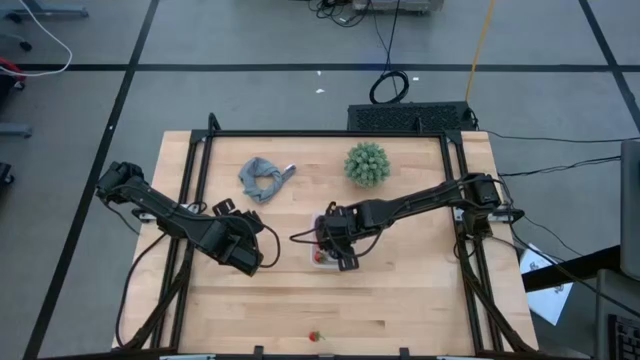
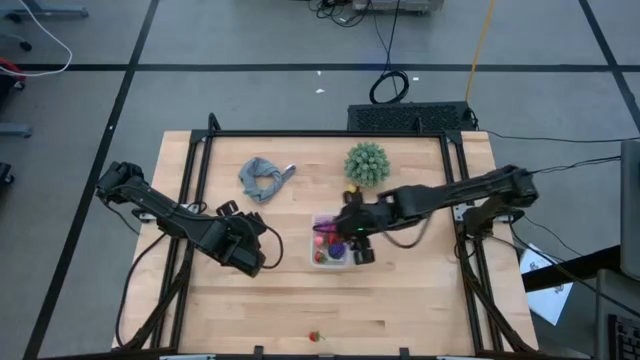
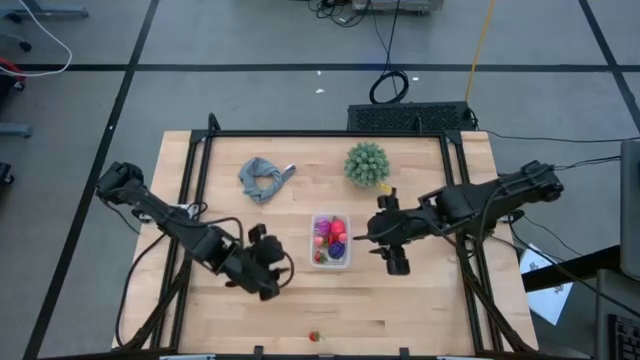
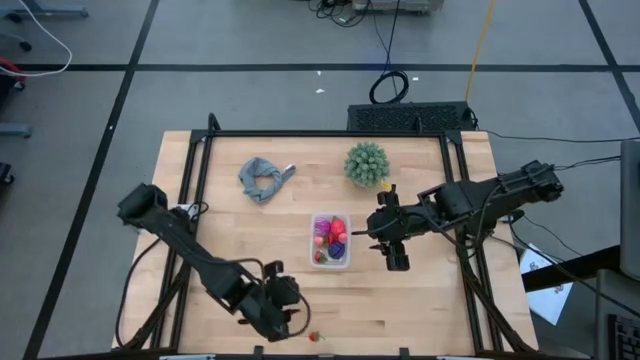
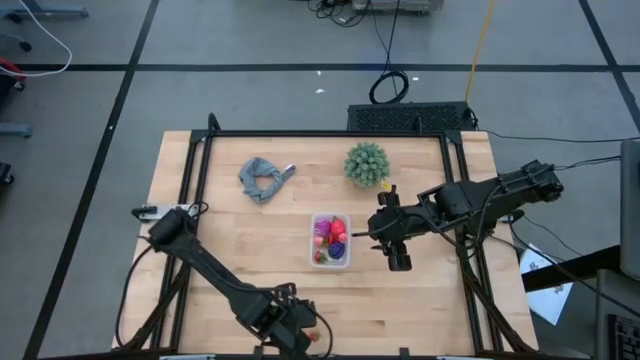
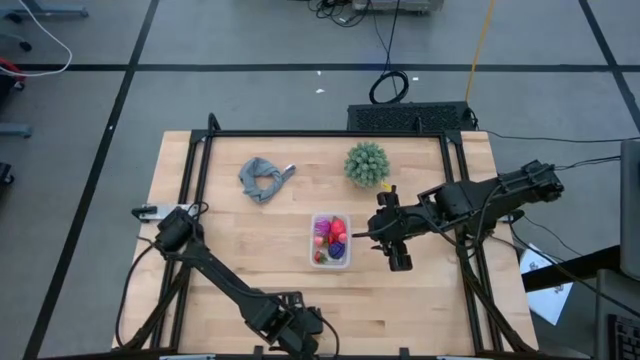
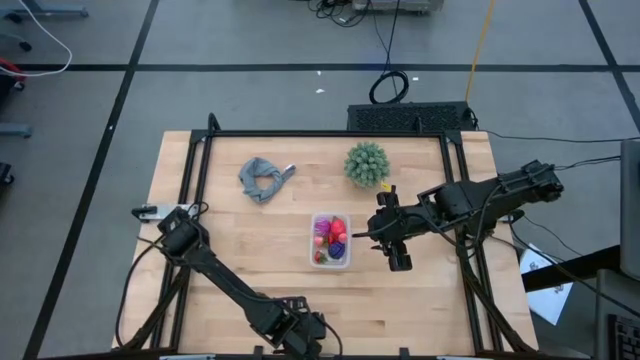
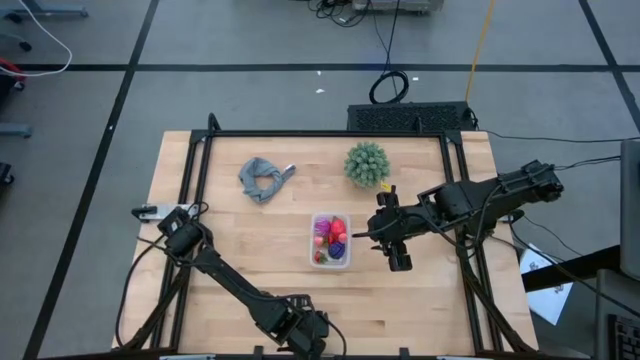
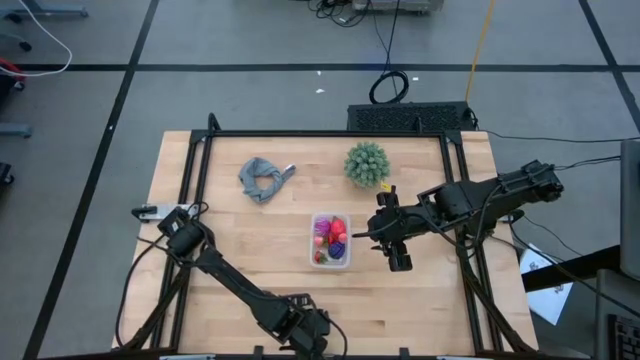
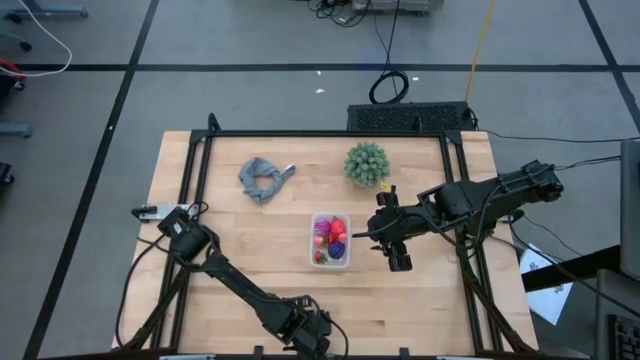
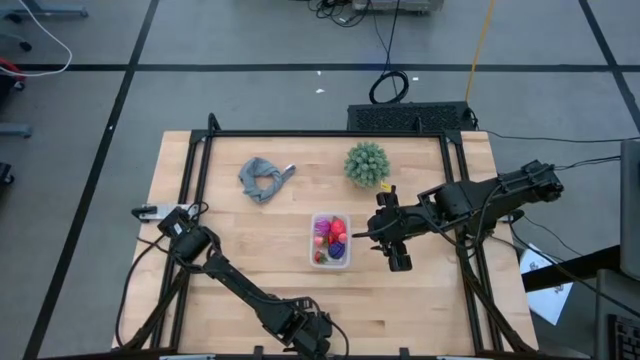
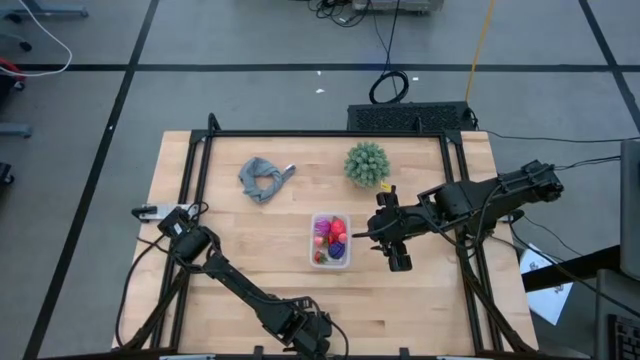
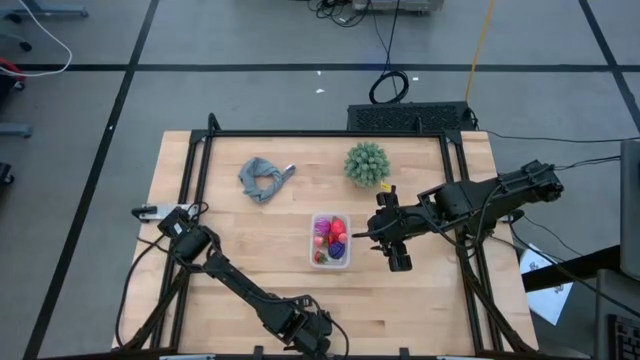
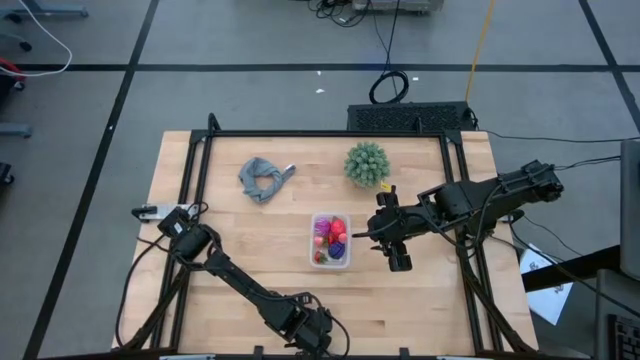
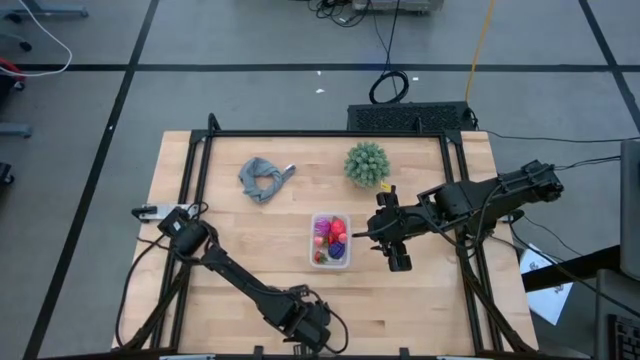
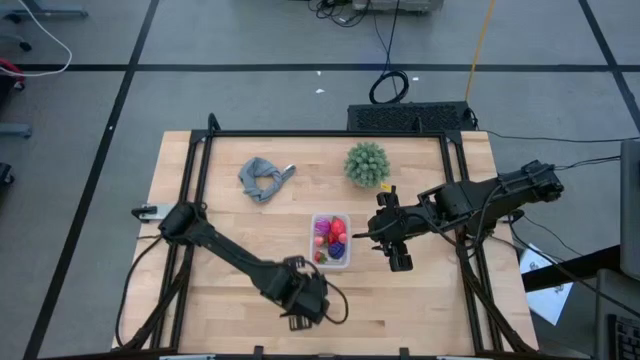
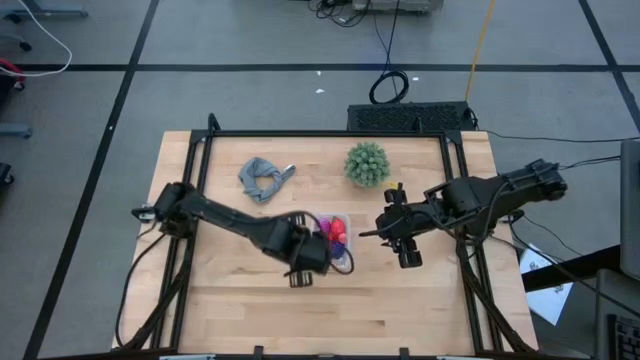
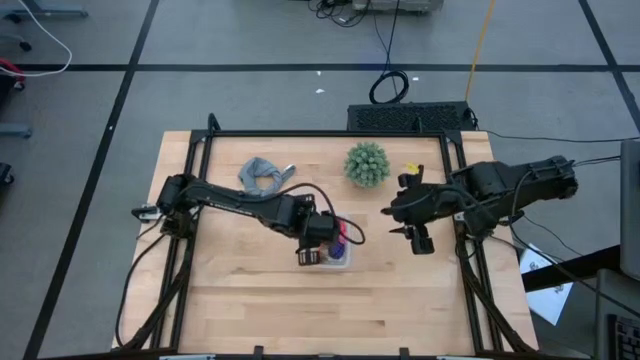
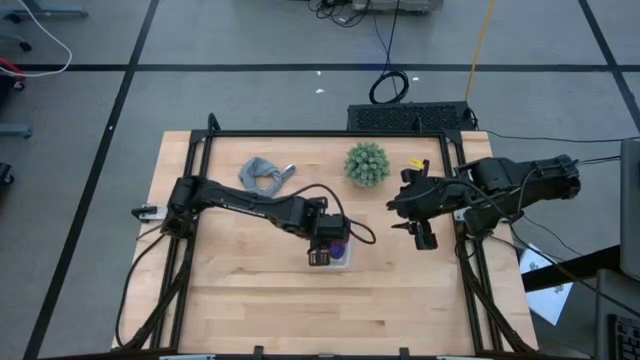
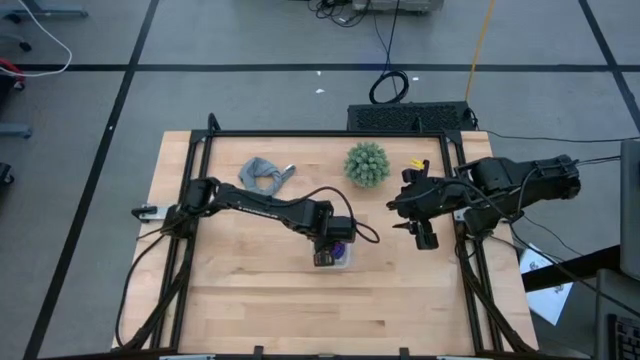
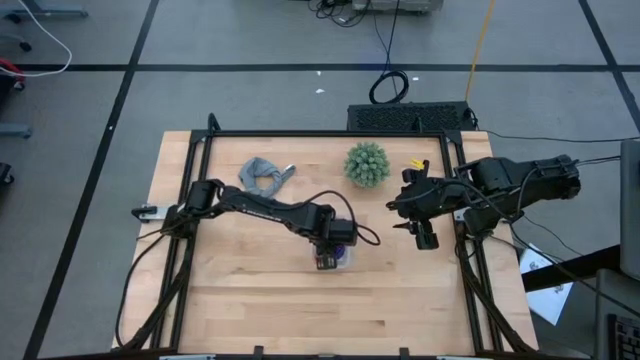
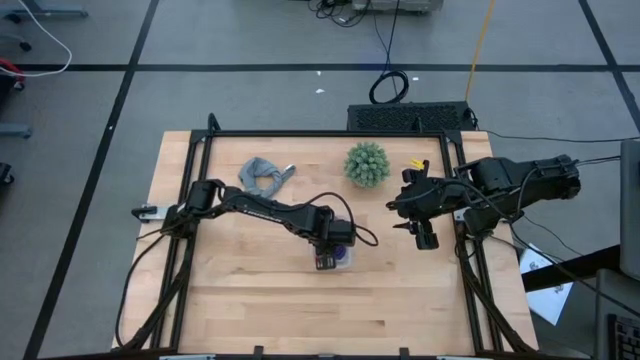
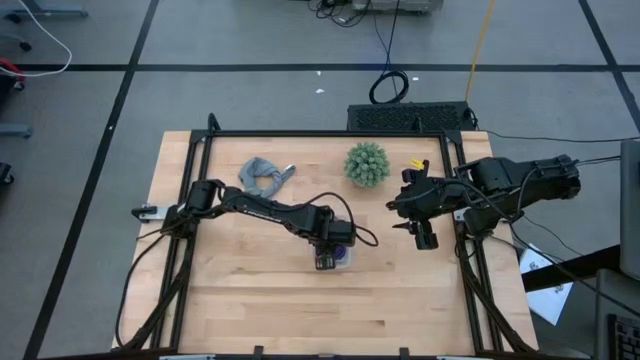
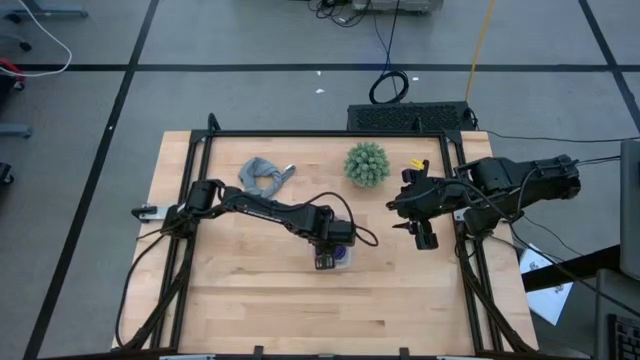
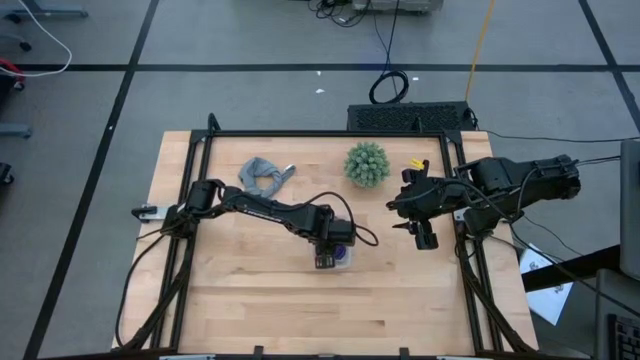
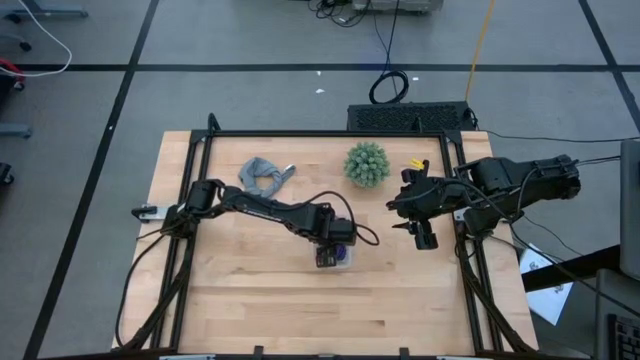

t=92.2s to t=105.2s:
Task: Pick and placing Produce into tupperware
Put the strawberry into the transparent bin
